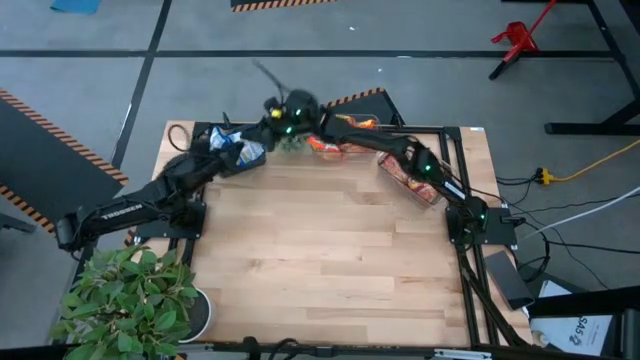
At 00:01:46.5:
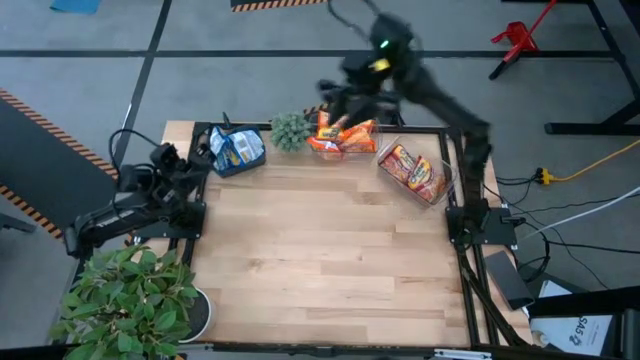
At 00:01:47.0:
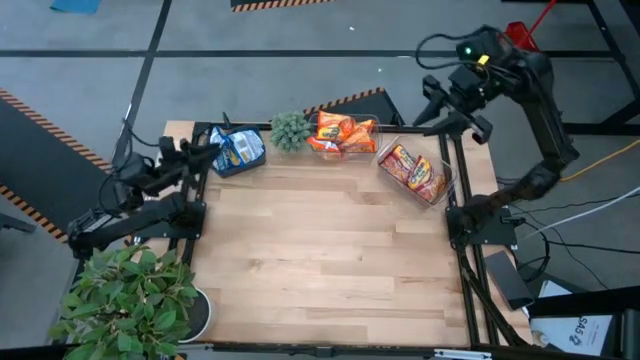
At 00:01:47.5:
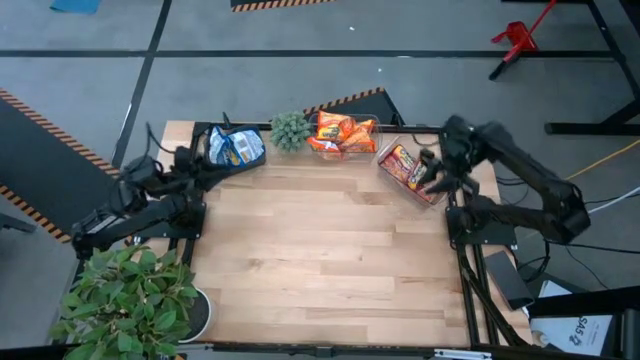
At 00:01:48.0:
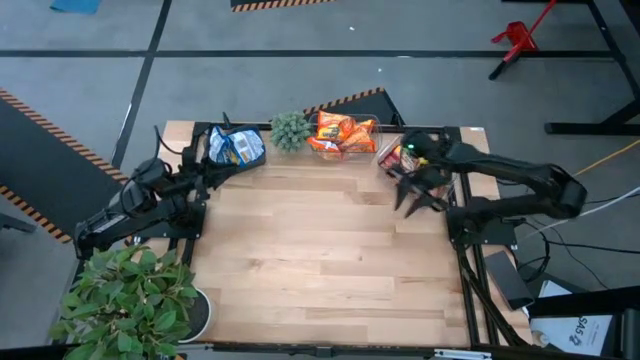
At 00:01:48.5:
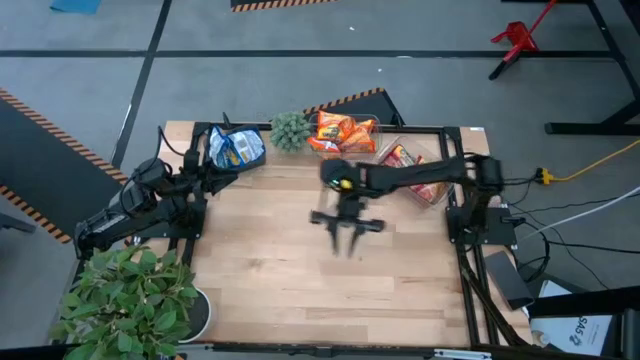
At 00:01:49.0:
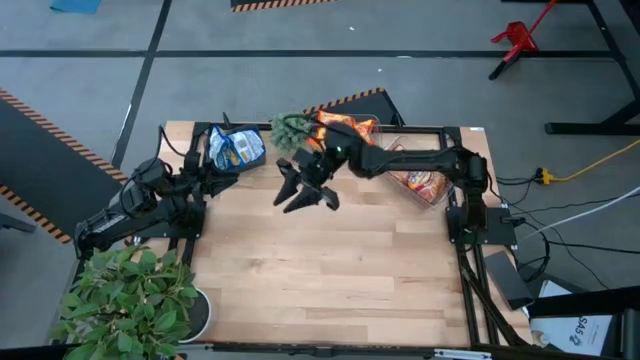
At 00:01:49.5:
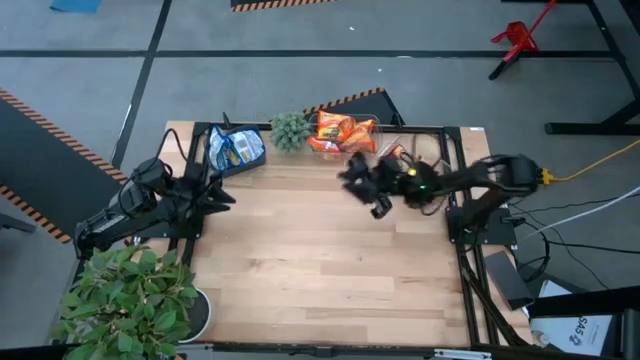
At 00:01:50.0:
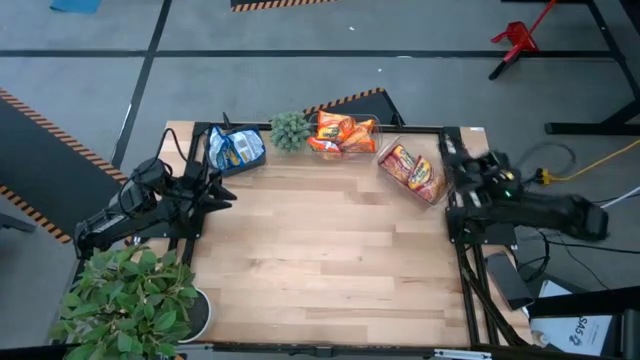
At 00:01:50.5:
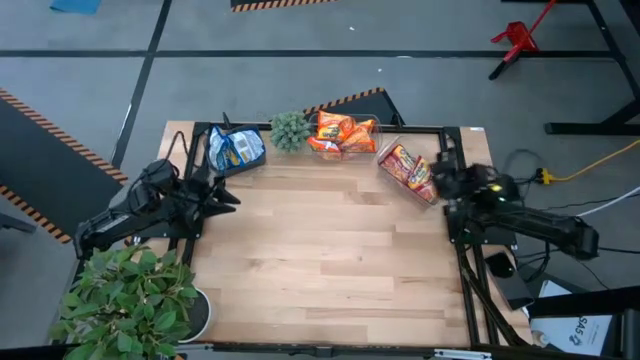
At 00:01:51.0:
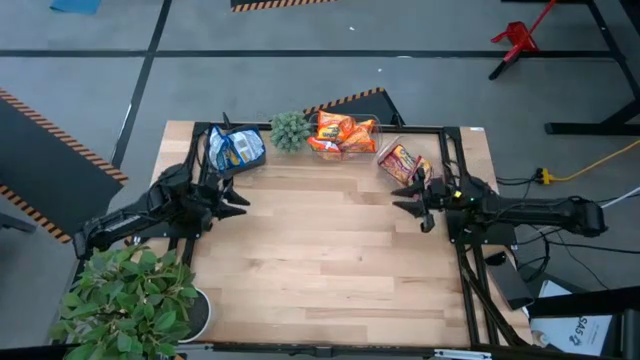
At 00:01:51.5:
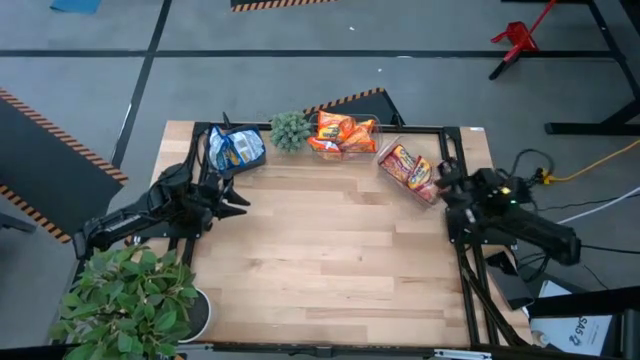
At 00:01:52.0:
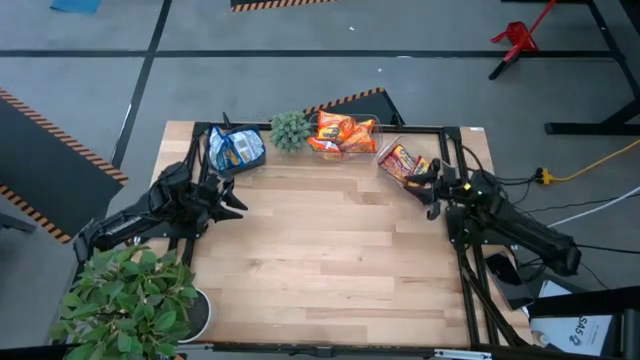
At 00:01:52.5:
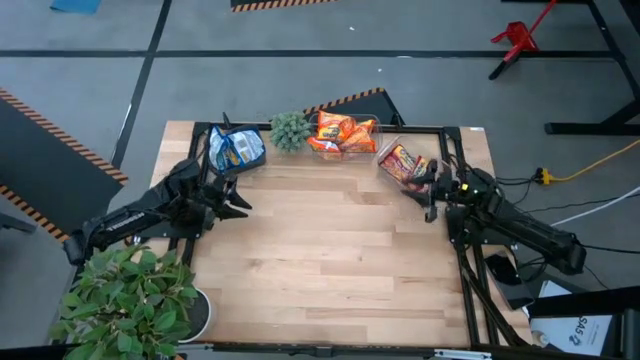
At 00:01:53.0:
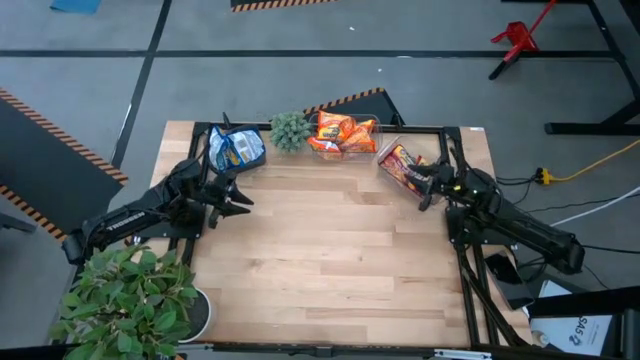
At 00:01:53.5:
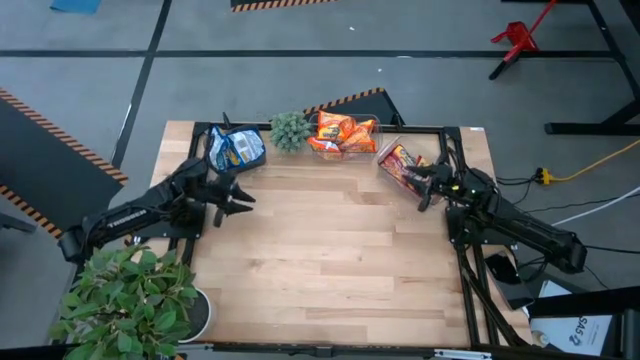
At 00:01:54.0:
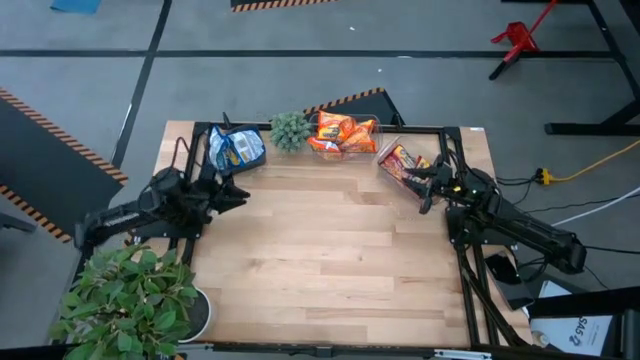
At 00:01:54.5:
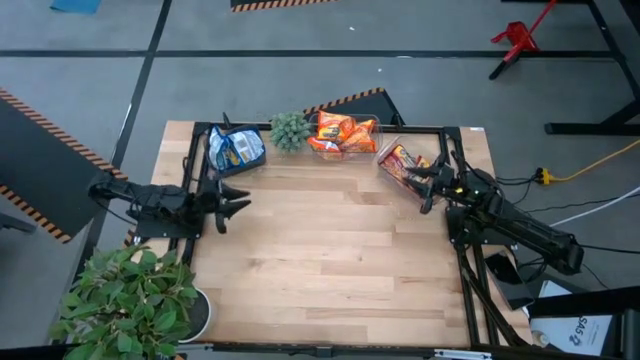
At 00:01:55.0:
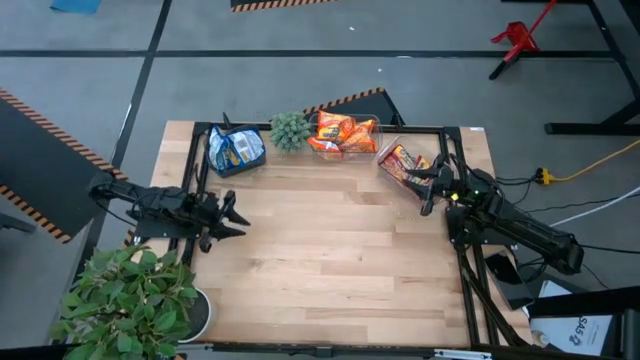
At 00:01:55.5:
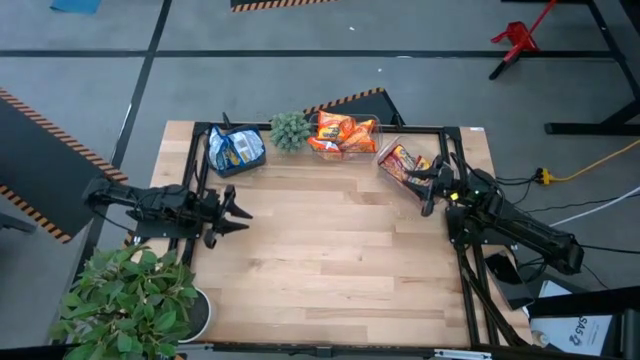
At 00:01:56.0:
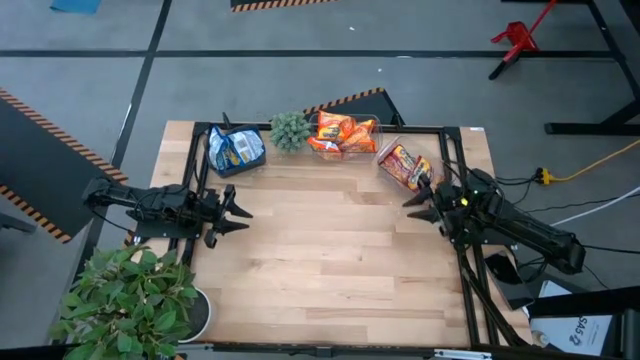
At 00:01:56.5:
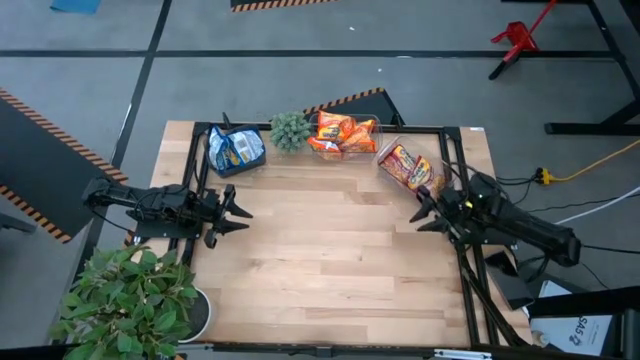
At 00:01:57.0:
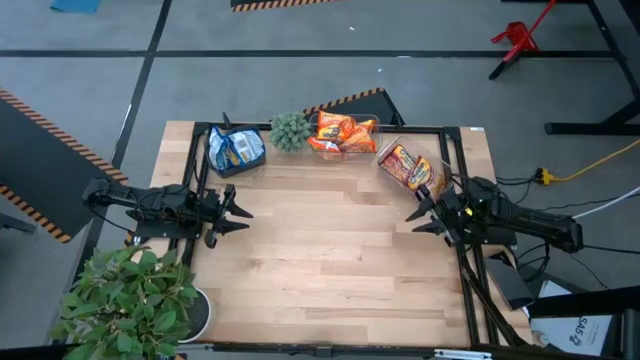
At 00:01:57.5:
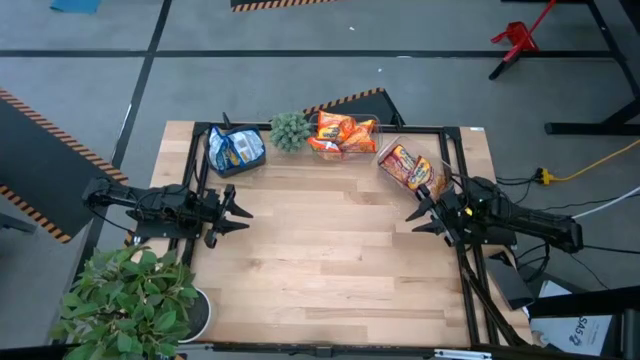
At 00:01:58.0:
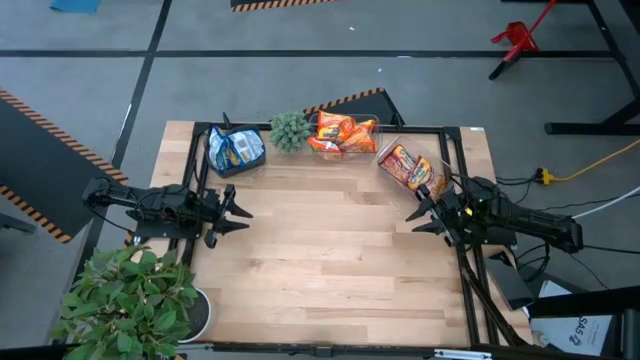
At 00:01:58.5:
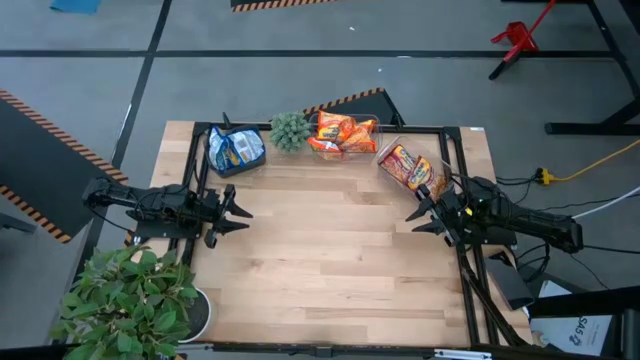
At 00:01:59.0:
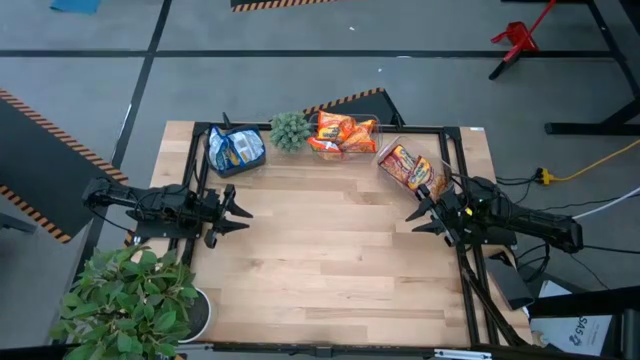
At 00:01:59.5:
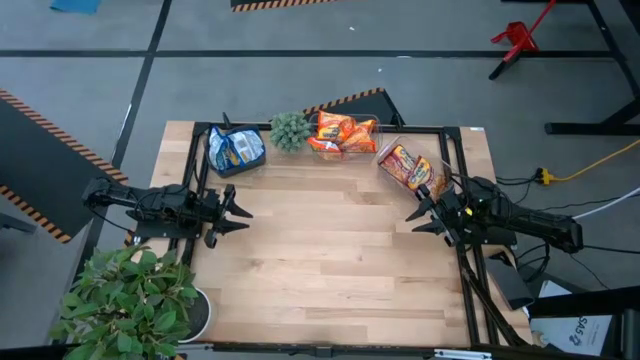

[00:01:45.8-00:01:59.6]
Task: Sort Maruchan noodles
Return to Home Position

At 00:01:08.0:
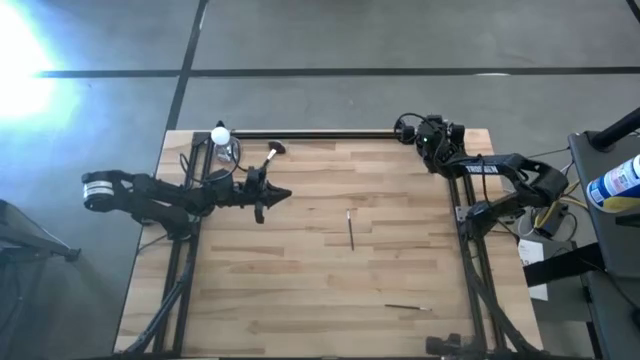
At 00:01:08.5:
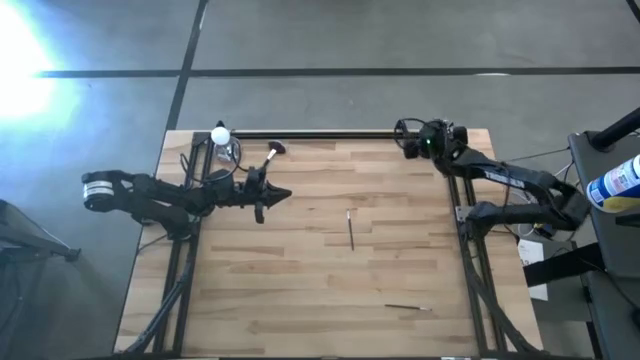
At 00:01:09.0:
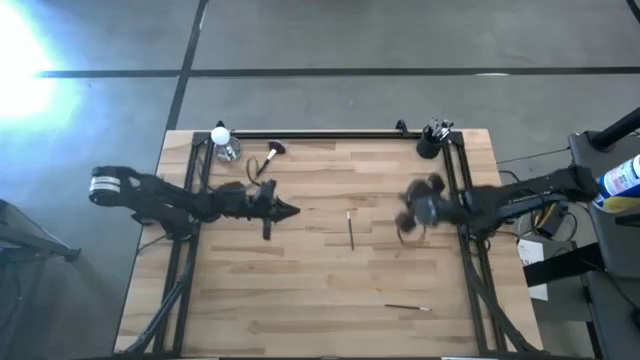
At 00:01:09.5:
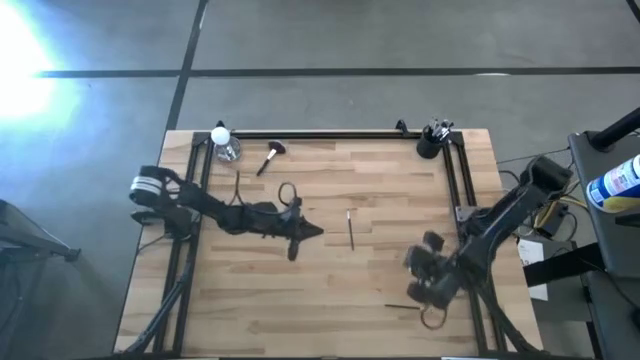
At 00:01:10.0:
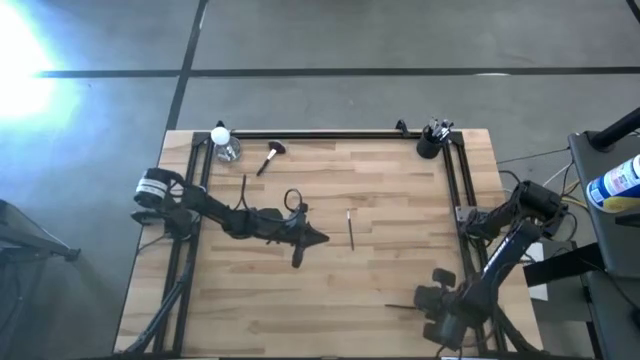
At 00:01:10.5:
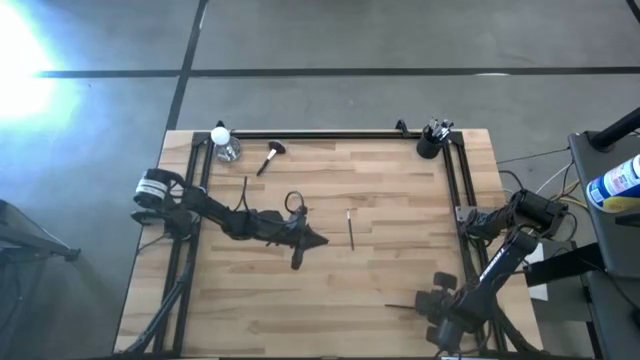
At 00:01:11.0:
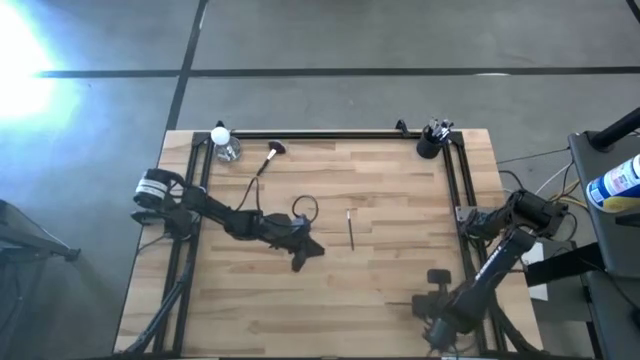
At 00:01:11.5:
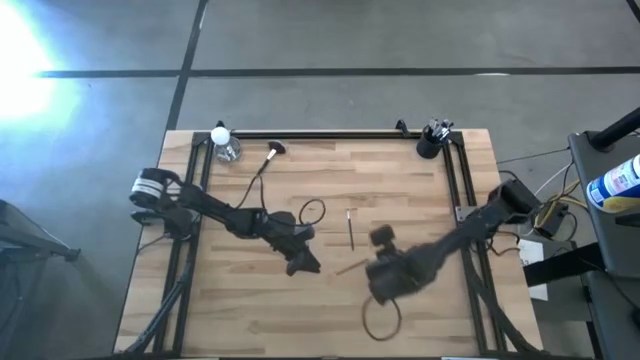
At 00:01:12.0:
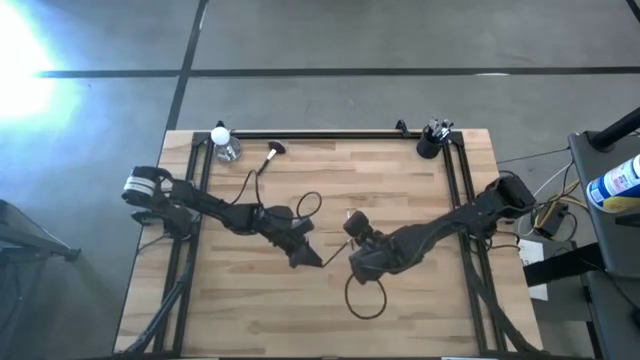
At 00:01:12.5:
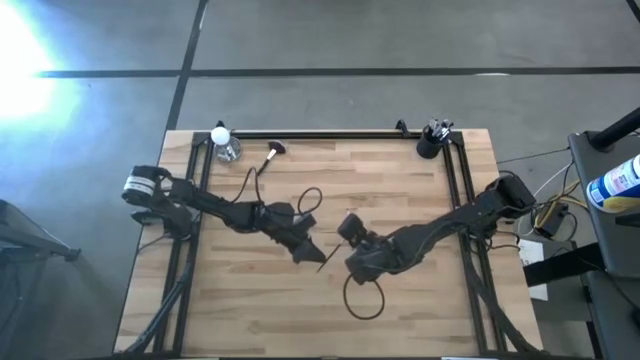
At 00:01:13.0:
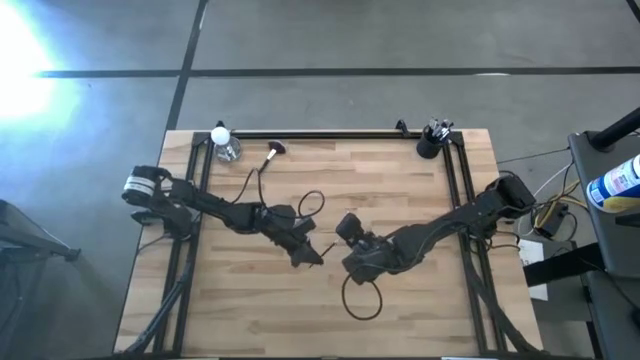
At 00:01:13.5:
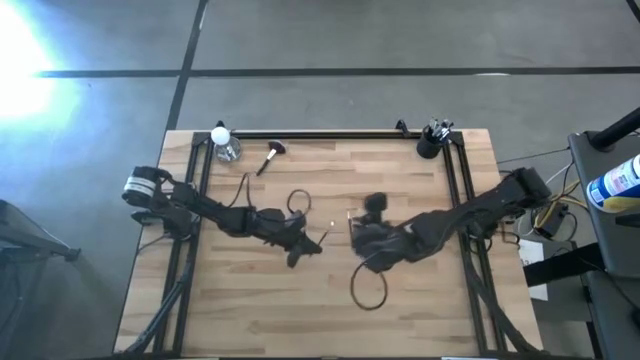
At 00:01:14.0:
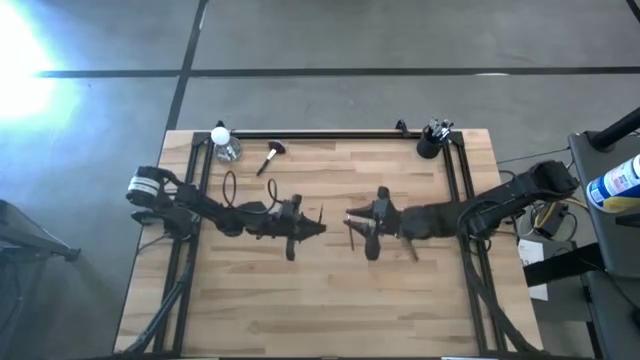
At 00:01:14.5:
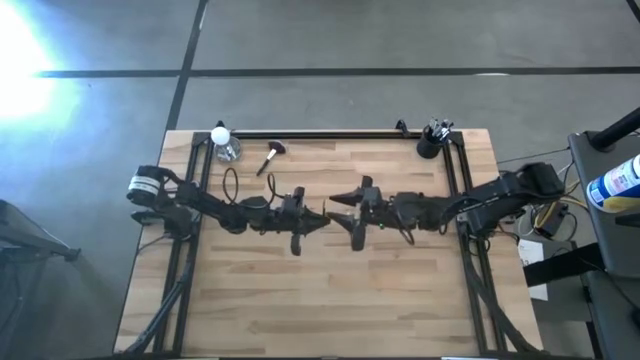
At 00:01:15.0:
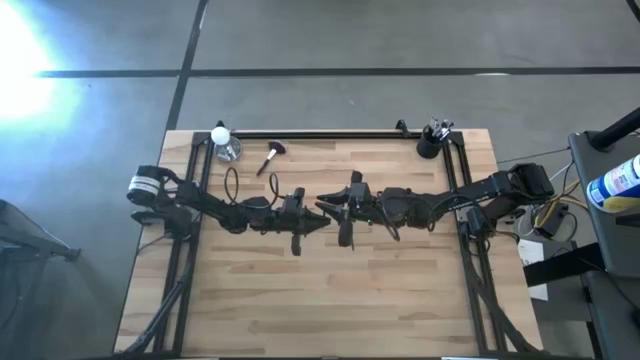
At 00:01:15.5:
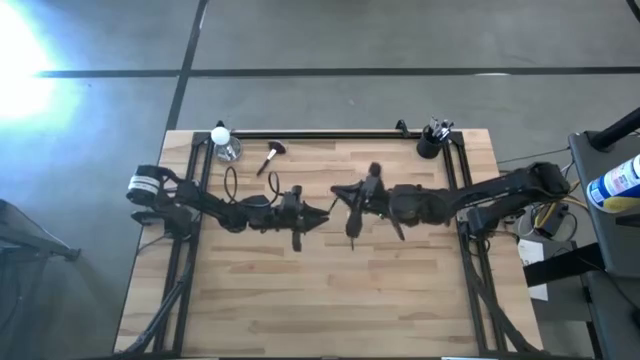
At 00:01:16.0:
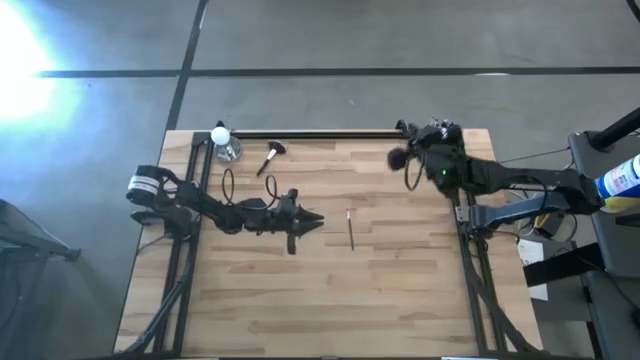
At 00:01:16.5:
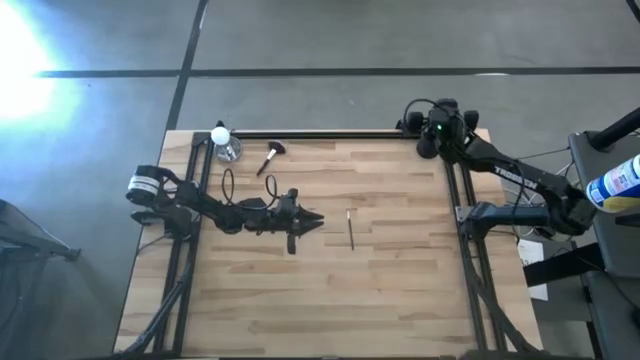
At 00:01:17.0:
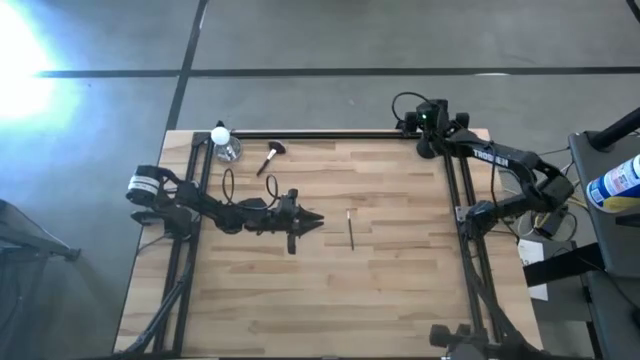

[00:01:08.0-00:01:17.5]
Task: Put items in baskets/containers
Put the foundation brush into the mesh organizer
